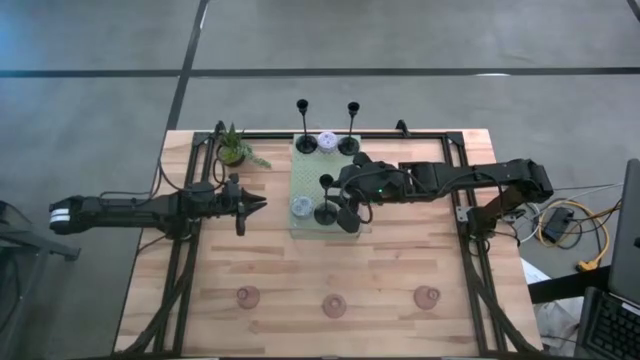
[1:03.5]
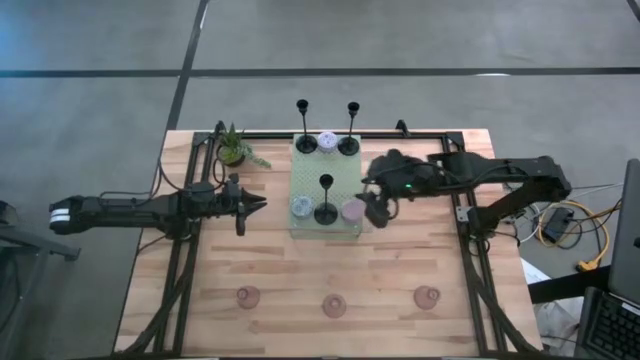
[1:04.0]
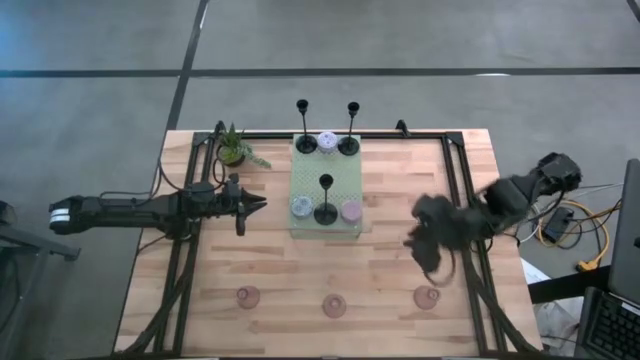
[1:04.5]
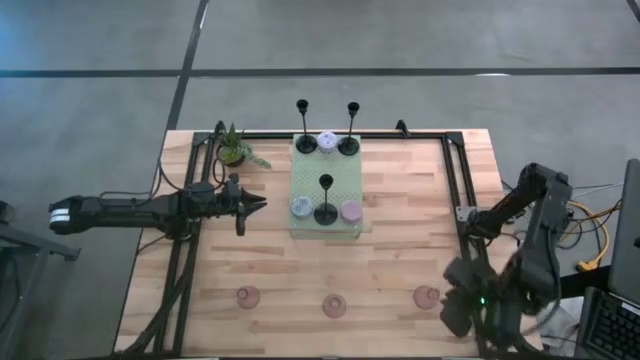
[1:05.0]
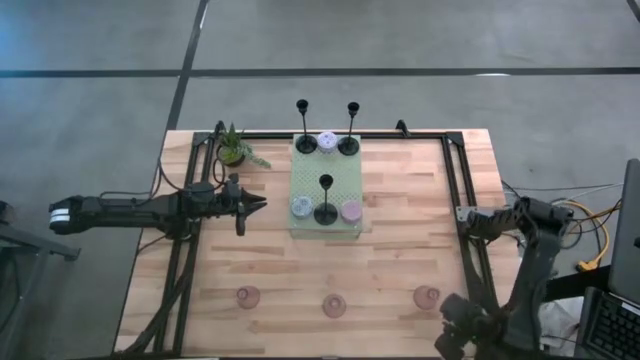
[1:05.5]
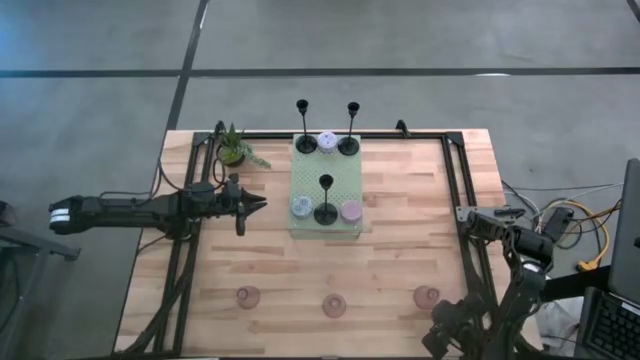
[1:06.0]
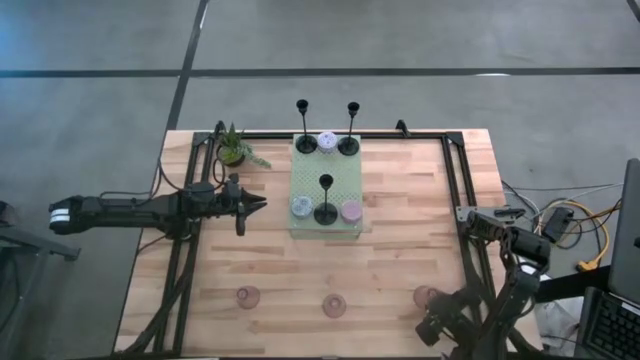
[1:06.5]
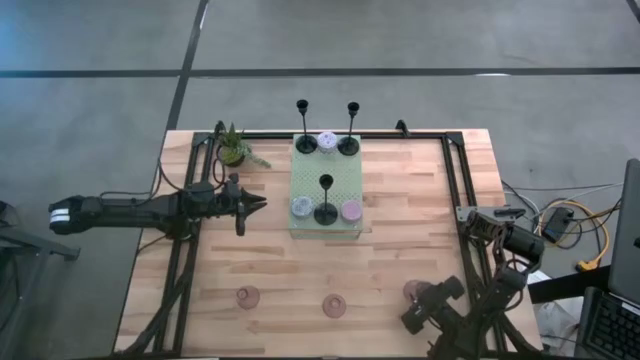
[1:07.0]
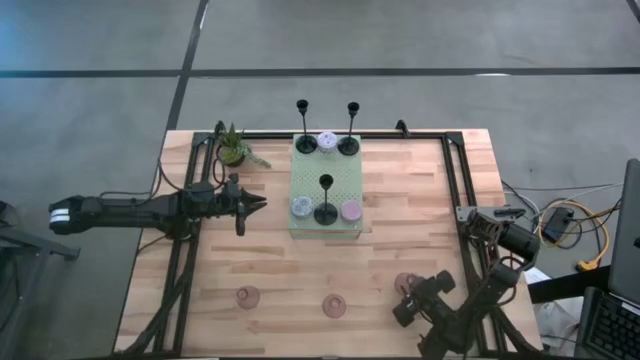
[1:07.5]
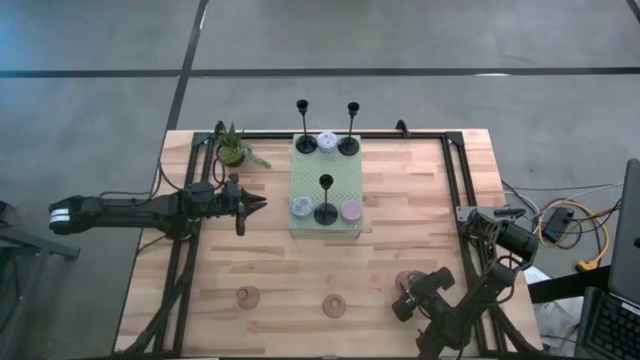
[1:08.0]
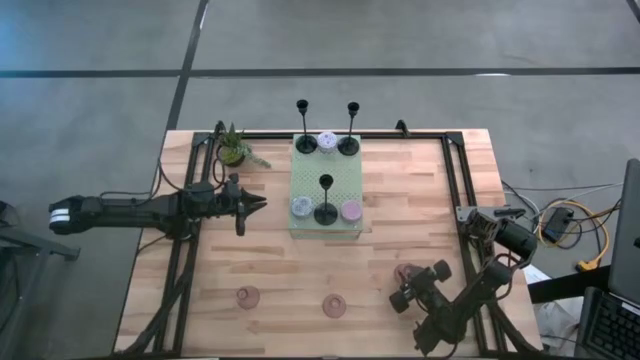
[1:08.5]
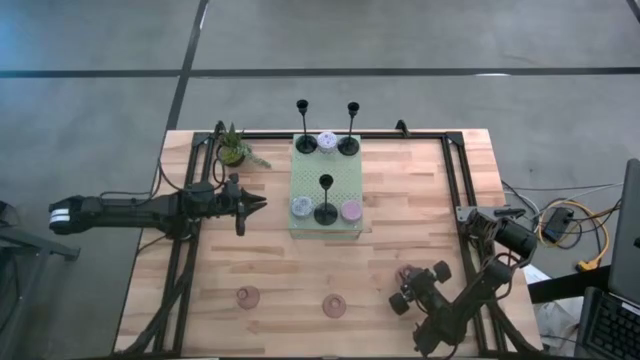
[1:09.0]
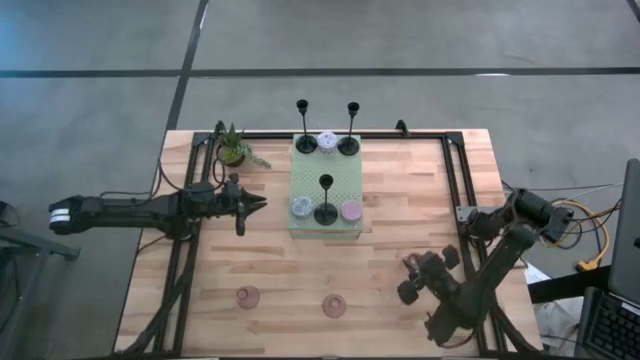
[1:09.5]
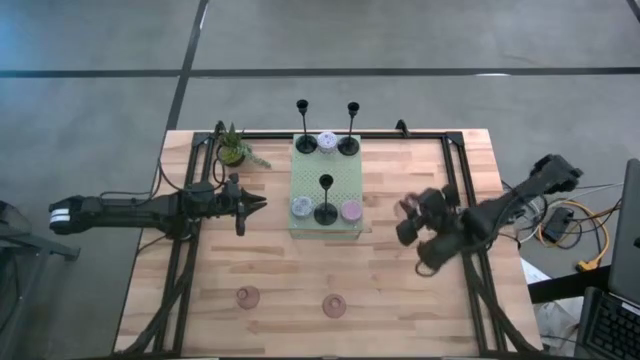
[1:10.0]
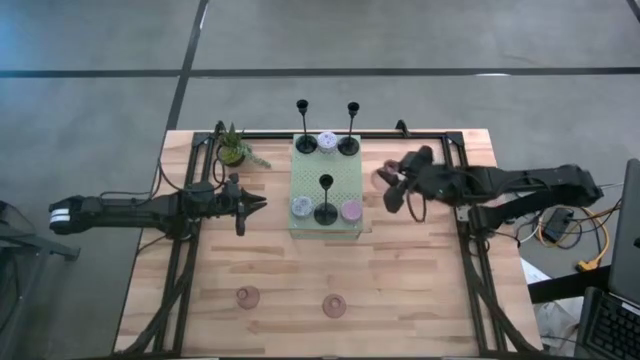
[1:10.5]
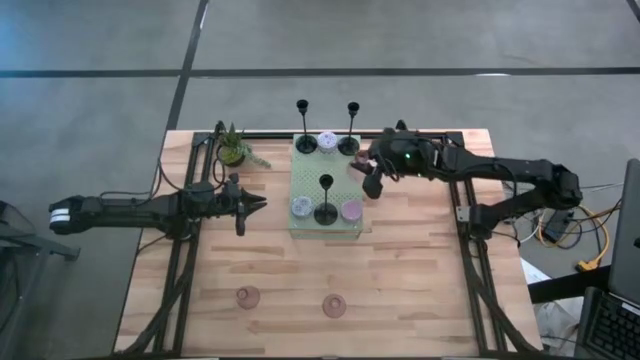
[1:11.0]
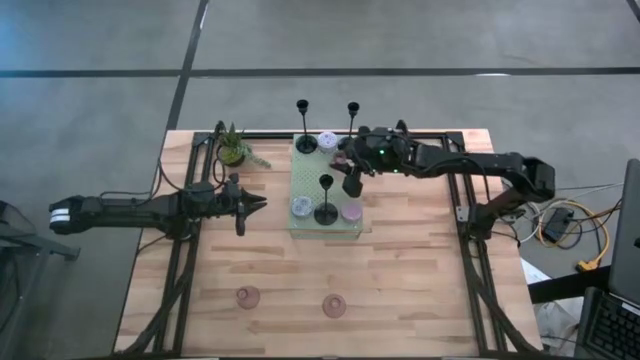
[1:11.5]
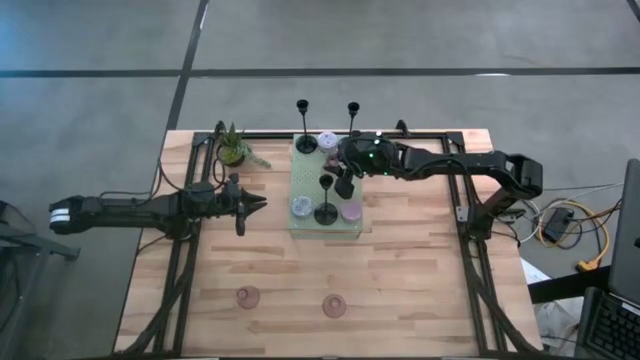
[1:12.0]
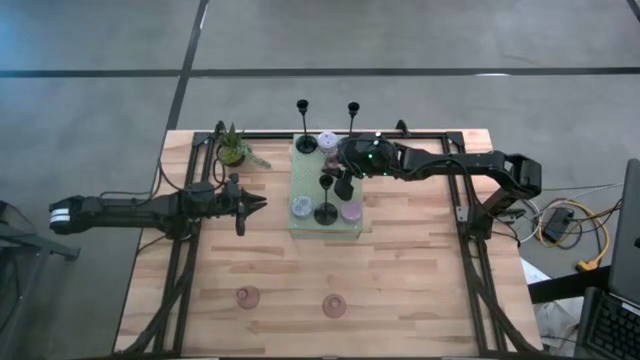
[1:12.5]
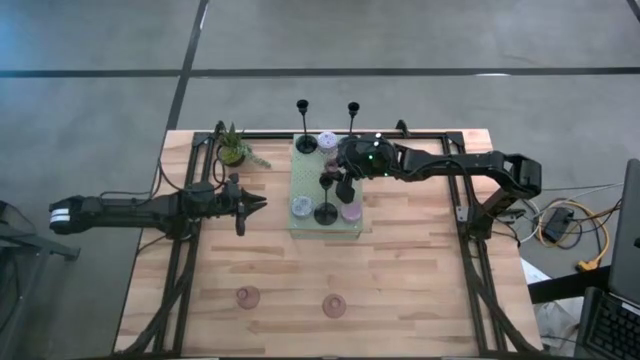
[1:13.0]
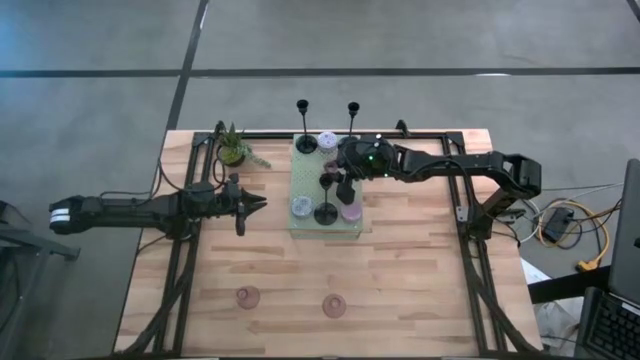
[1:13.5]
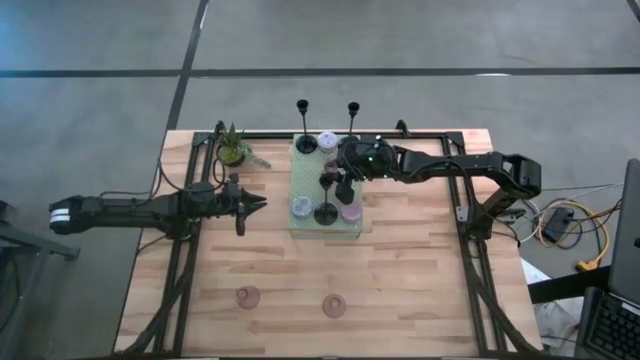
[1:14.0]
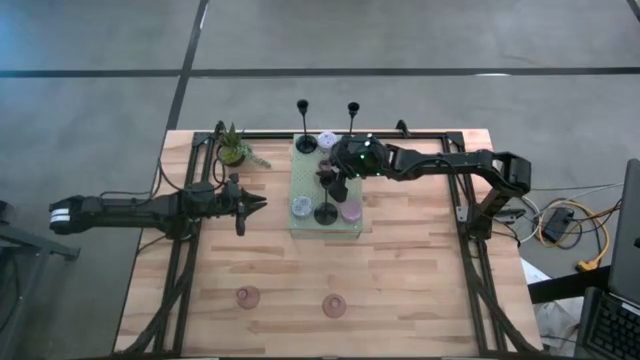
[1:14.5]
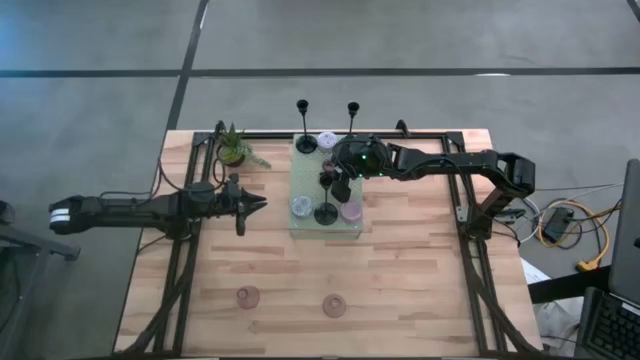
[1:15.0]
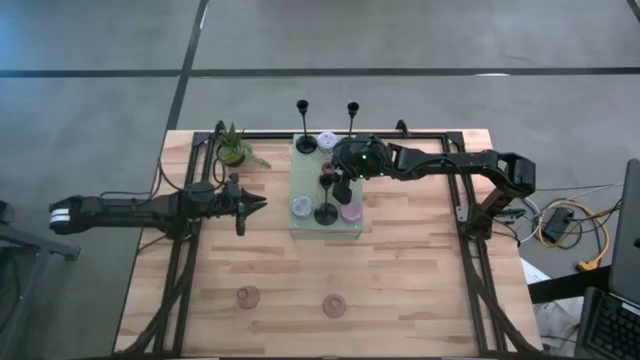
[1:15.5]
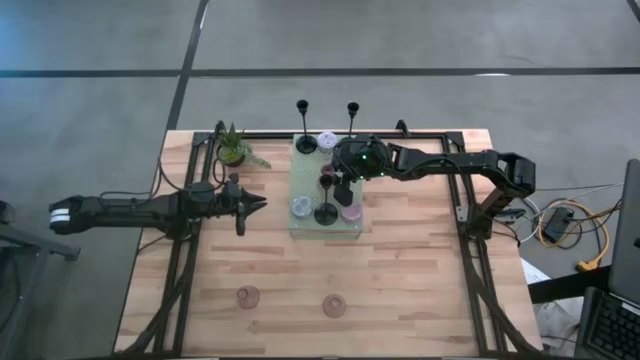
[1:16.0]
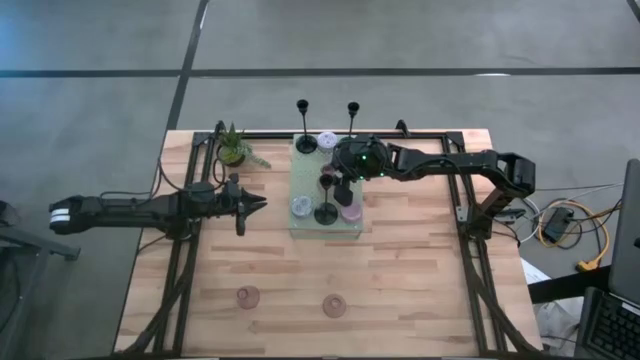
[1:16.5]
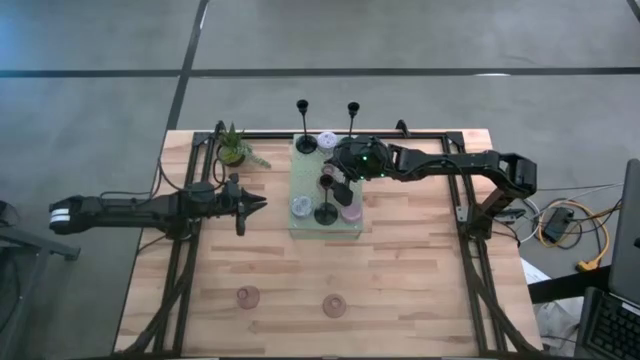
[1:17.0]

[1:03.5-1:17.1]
Task: Pick & Place candle stick holders
Put the right pink candle holder on the shelf

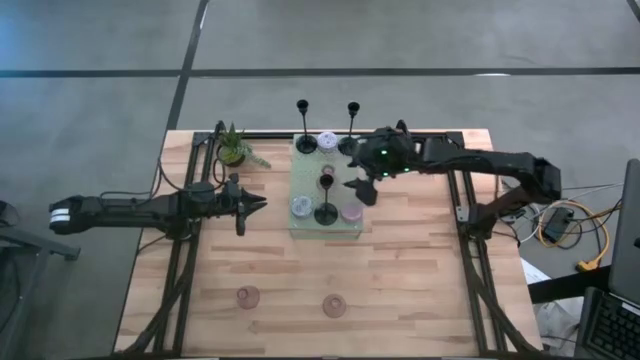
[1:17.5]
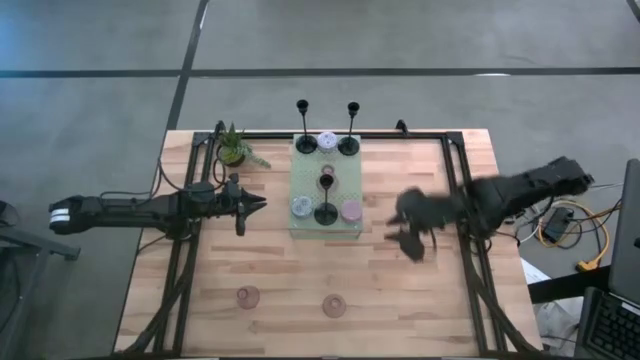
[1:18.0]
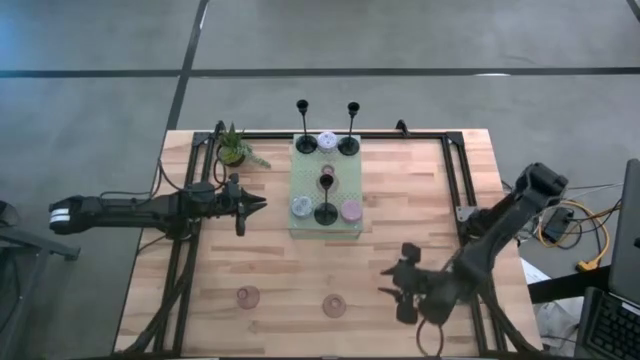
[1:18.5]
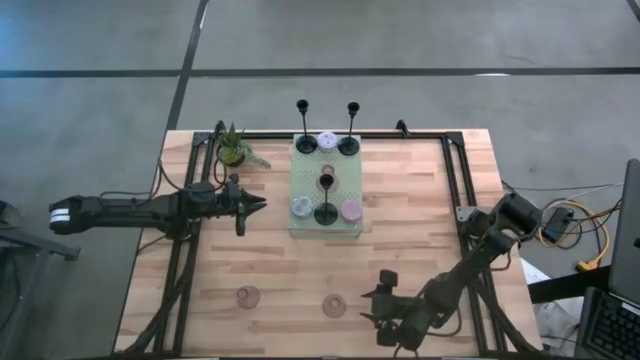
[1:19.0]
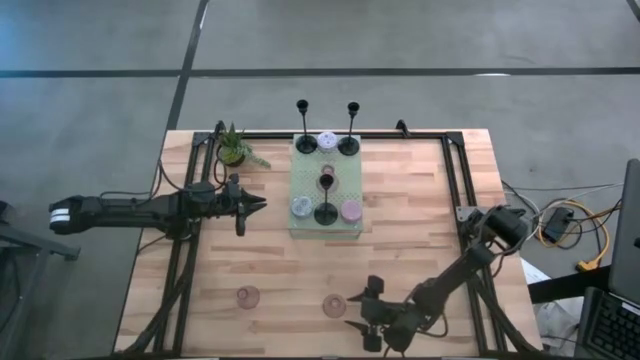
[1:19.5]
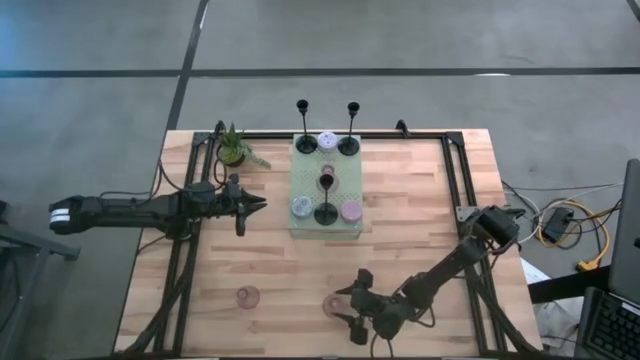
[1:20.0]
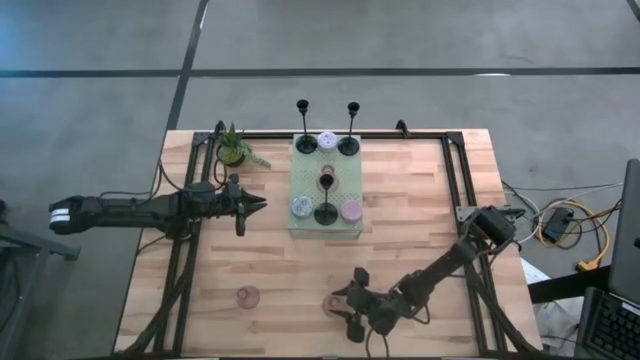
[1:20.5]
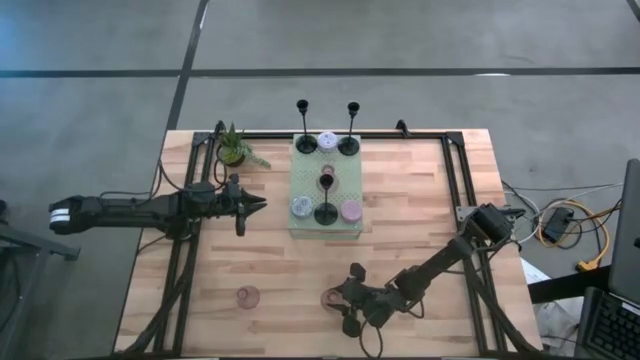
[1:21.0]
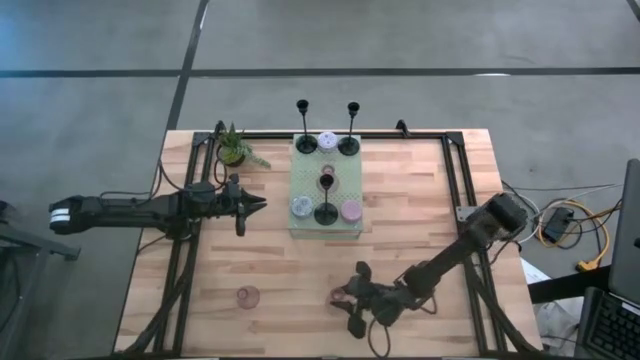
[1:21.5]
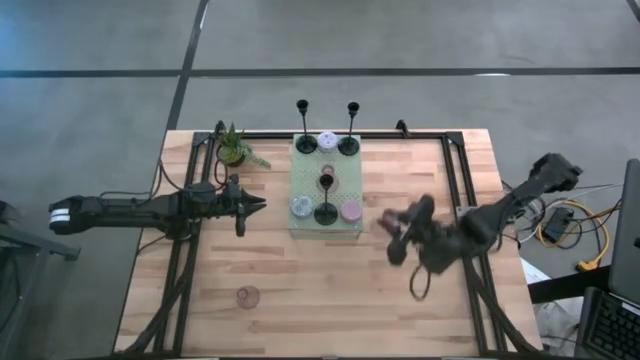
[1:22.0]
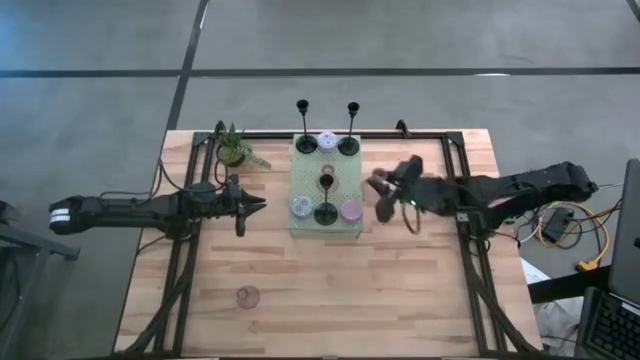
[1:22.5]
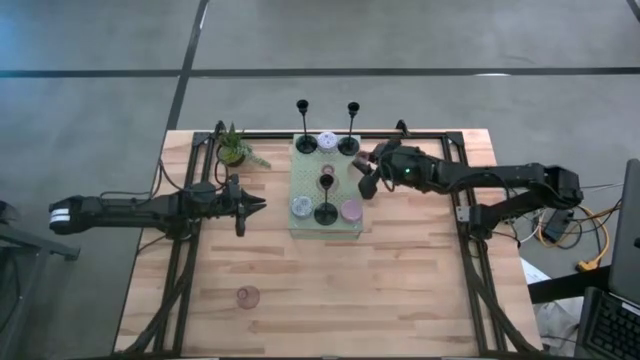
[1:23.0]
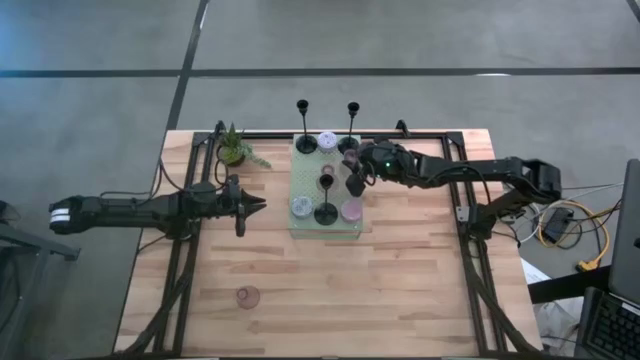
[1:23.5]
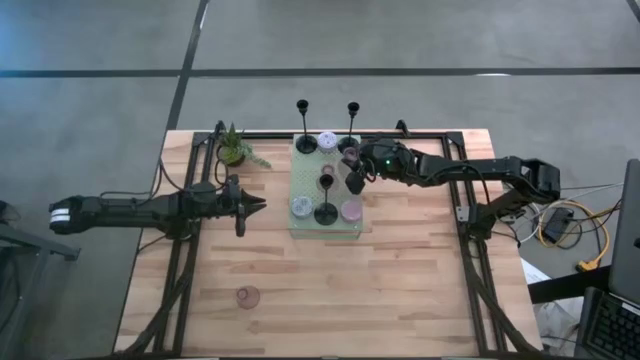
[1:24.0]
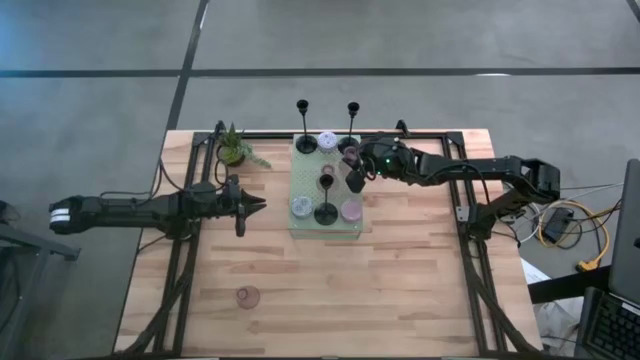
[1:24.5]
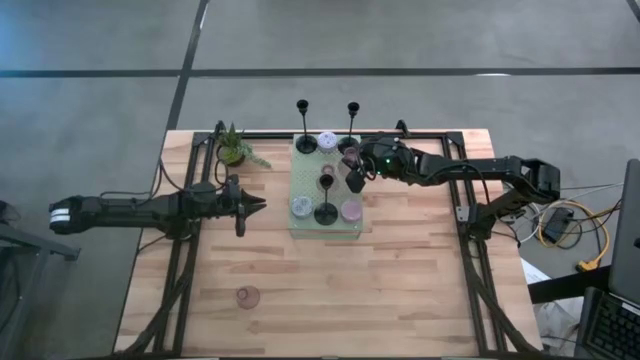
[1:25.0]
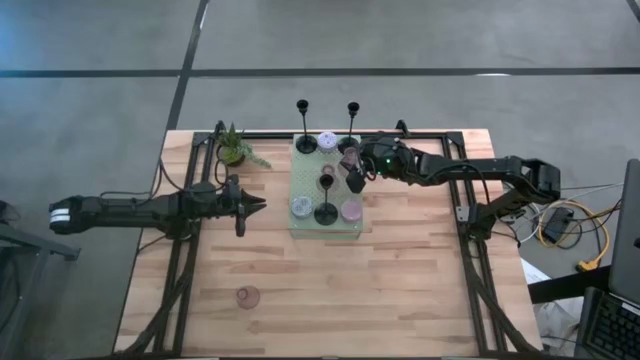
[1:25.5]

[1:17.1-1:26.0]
Put the right pink candle holder on the shelf
